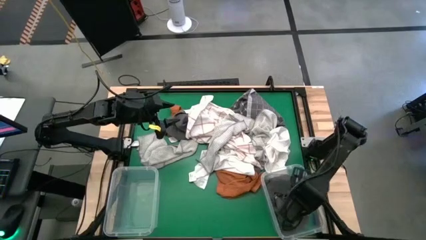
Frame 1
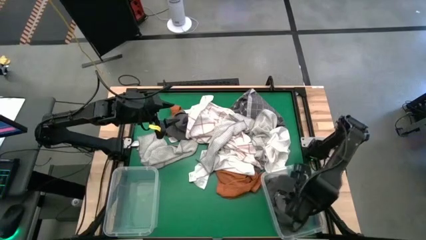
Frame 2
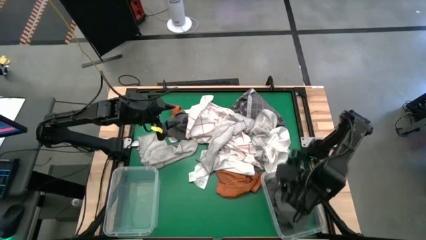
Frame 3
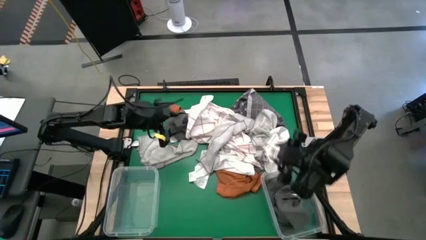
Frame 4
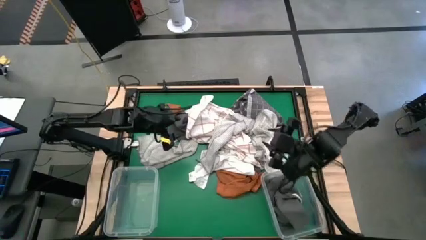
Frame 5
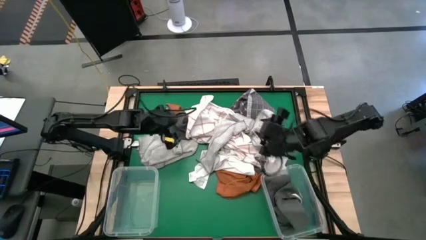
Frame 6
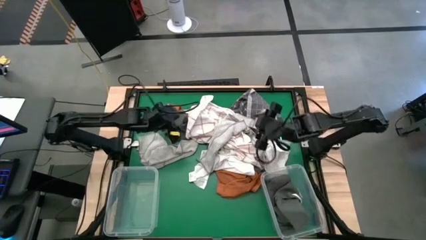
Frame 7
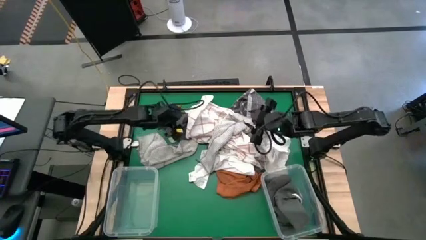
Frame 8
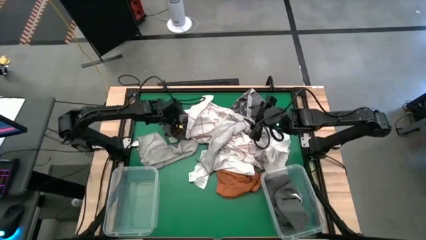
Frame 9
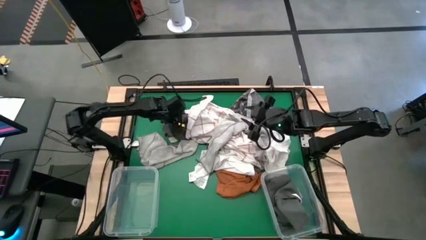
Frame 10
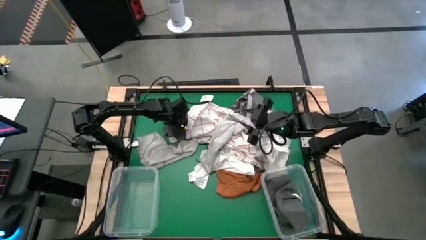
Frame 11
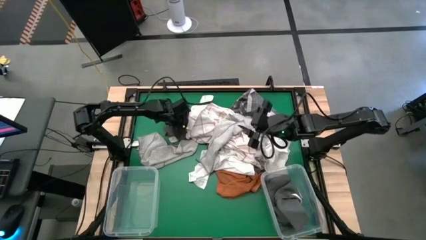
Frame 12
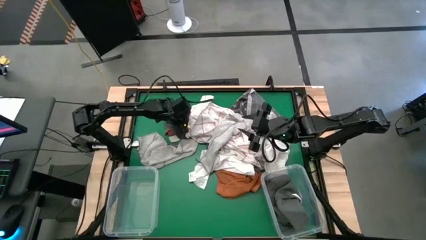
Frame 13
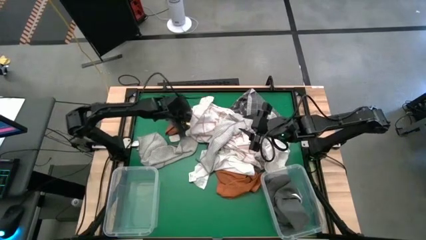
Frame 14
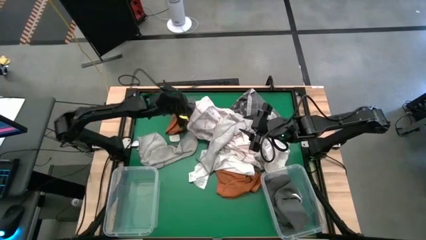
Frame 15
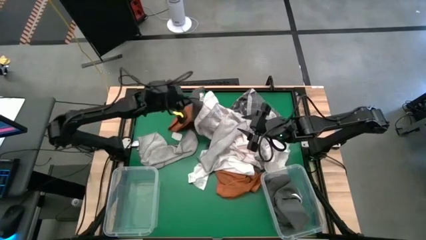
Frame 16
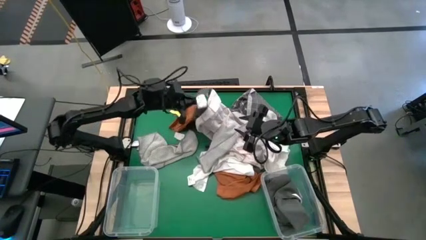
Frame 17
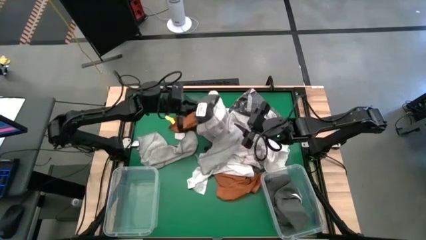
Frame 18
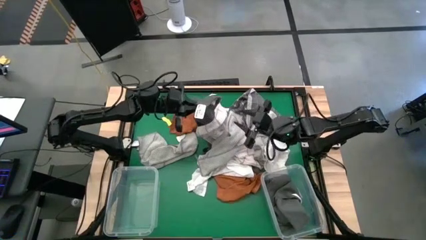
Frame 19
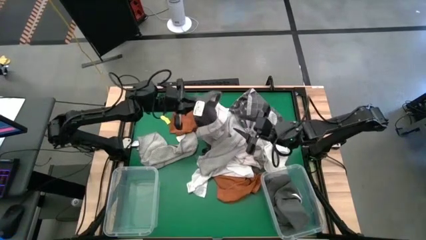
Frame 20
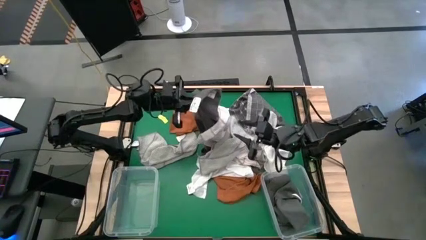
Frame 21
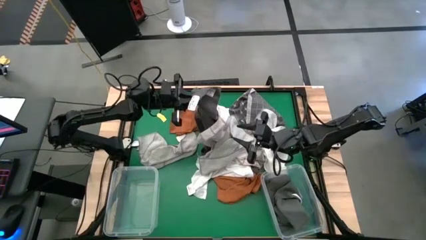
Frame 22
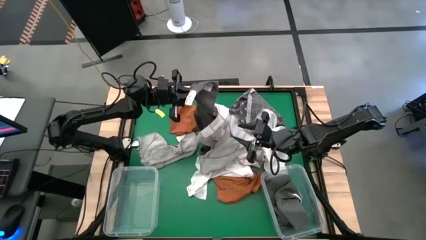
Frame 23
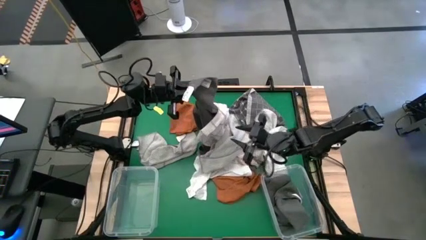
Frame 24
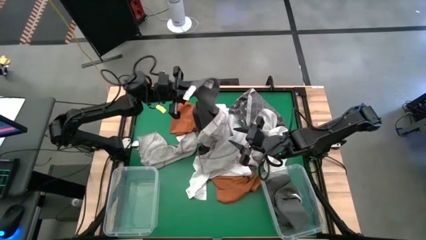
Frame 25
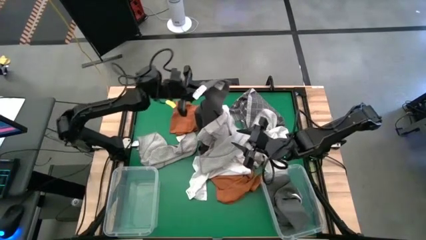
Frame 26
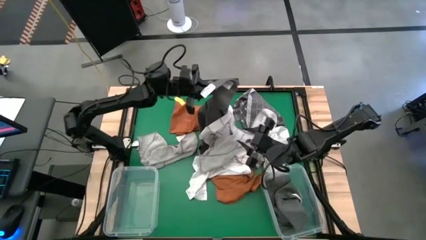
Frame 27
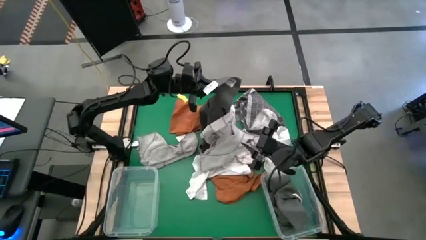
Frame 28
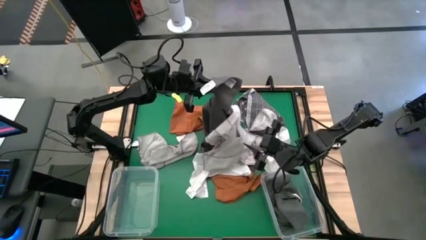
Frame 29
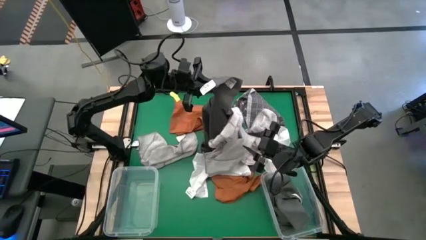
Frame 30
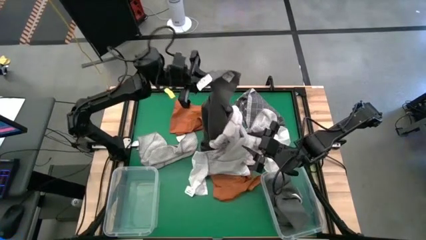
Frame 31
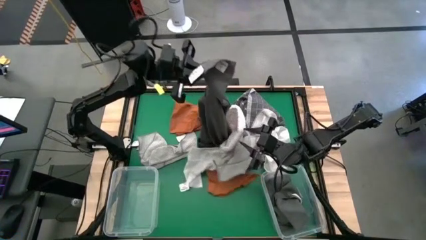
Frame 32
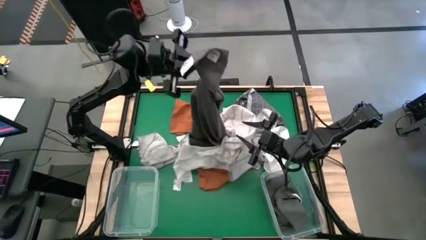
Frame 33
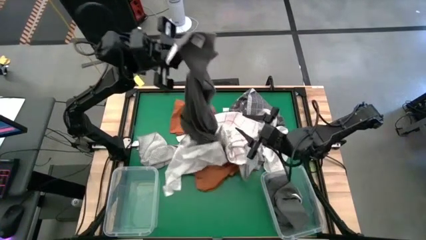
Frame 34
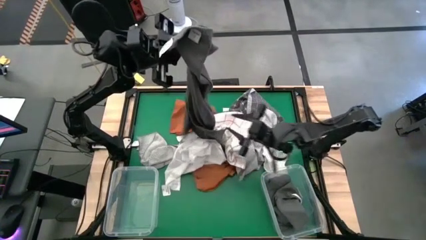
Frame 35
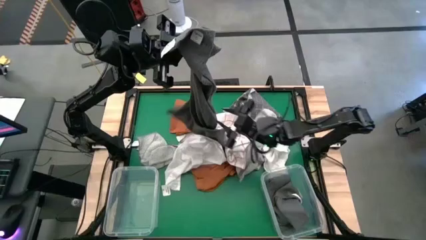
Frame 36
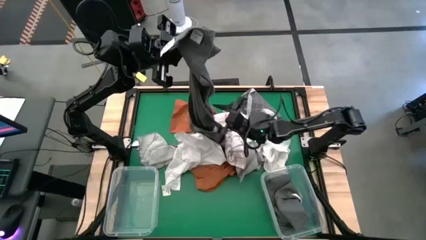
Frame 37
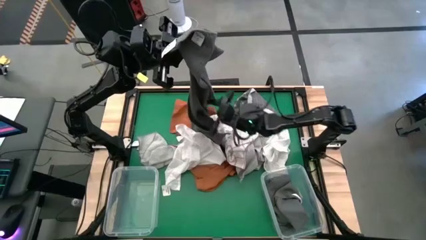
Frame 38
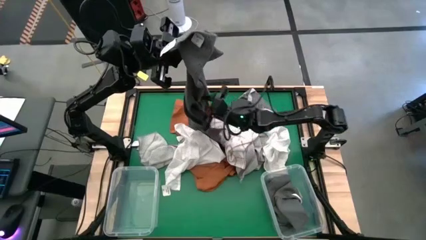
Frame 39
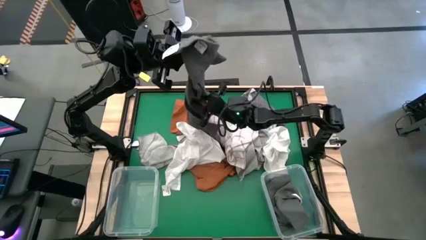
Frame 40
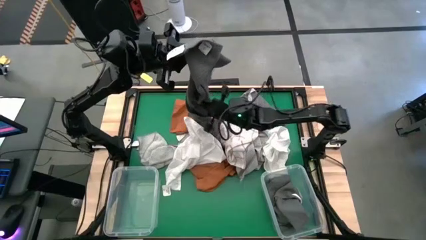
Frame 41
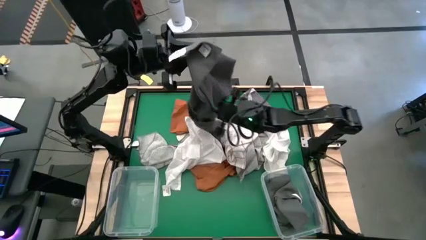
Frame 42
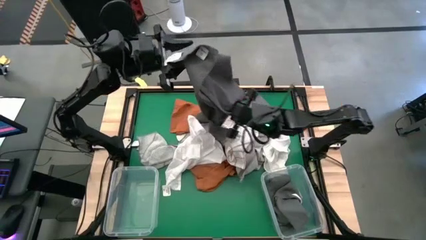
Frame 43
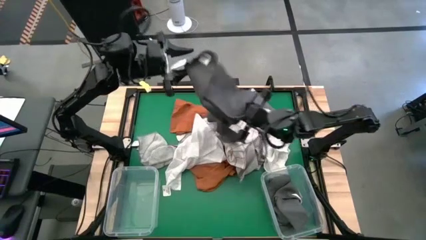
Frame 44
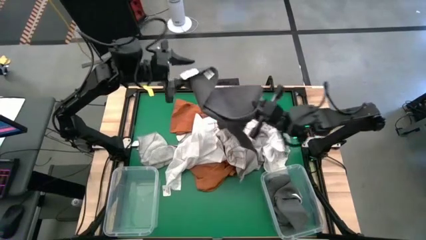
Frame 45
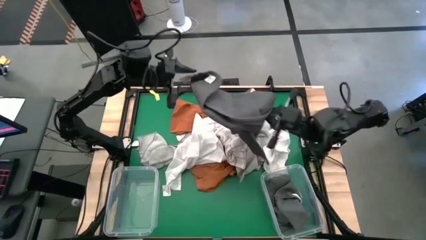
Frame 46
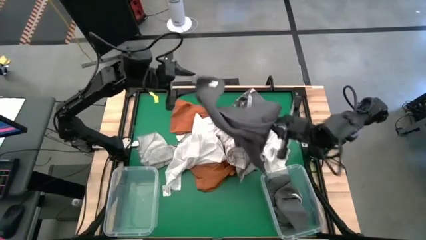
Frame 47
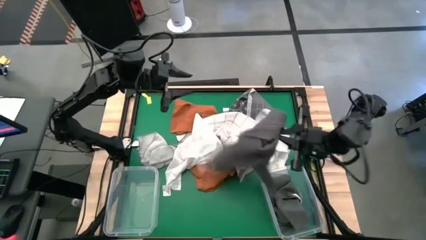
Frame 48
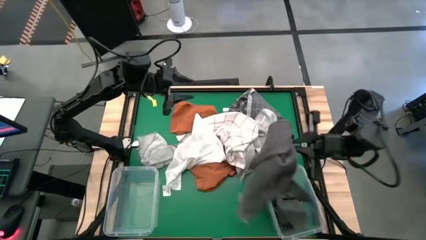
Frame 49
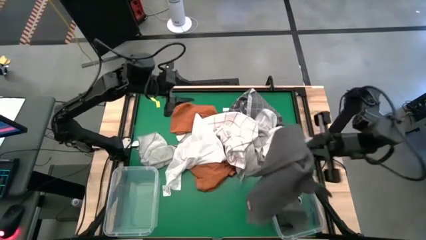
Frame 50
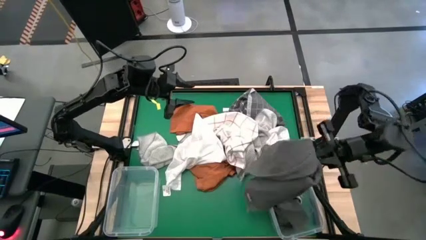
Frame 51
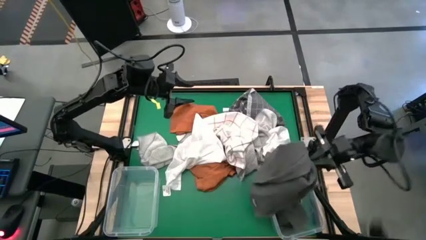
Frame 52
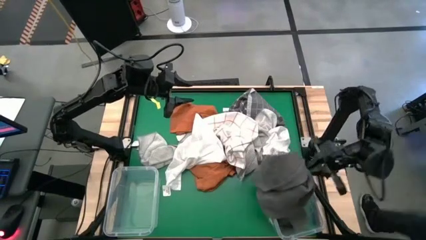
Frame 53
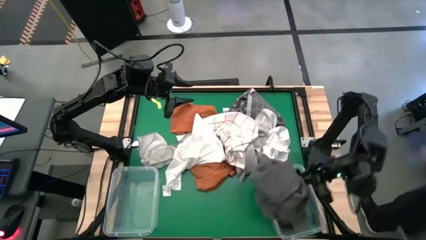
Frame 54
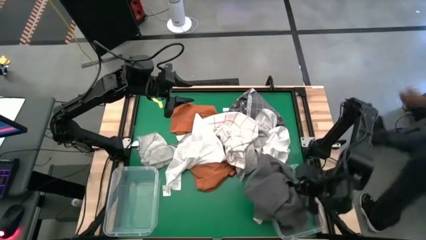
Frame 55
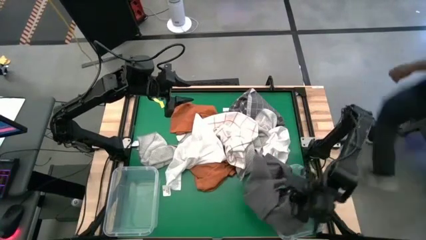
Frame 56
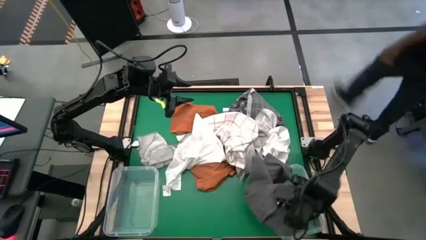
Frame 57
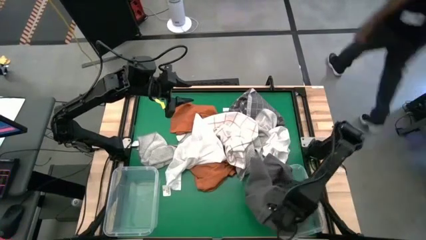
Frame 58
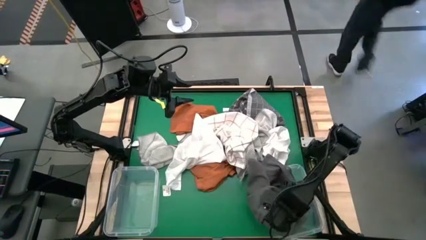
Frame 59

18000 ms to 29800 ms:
Task: Sort towels by color in basket
Put the gray towel into the right transparent bin
